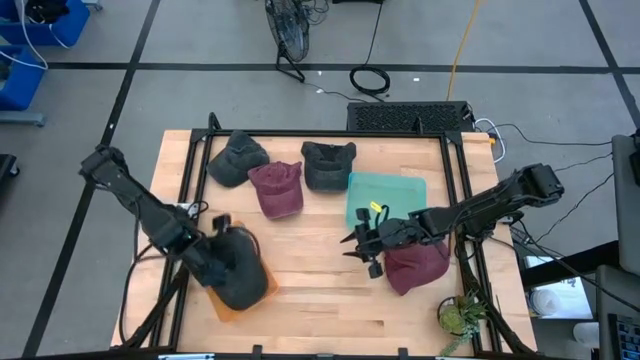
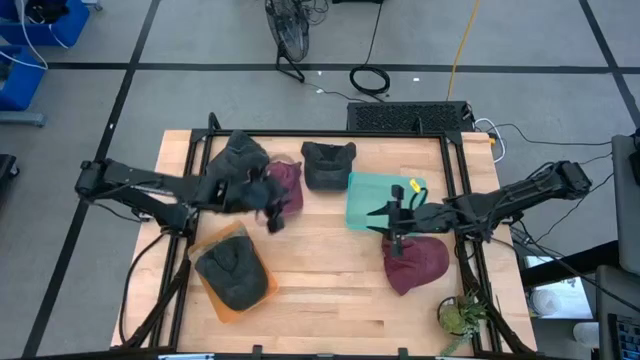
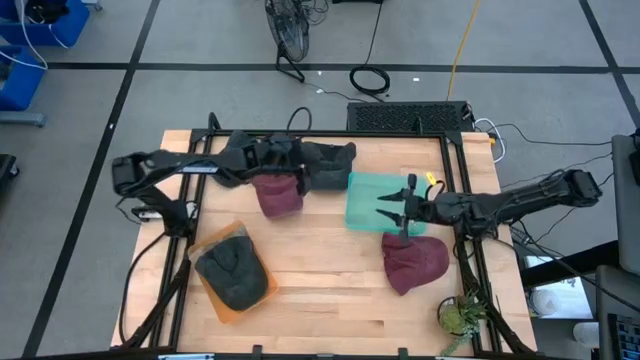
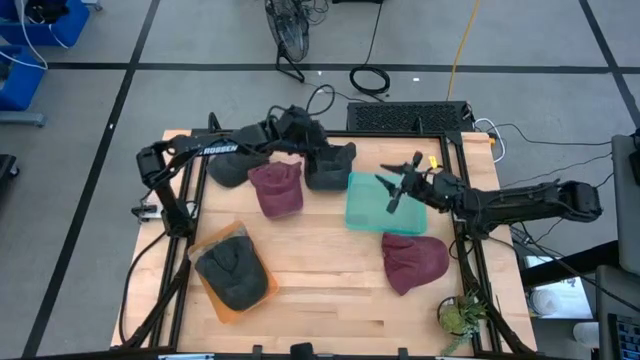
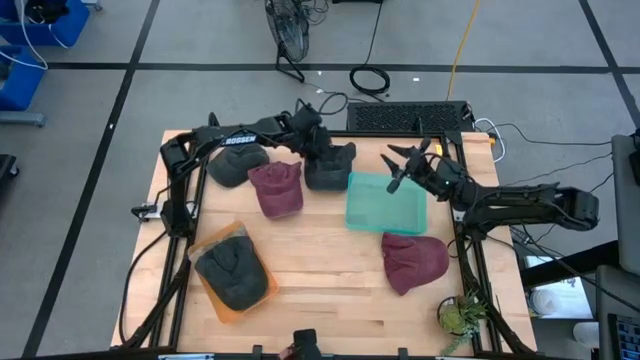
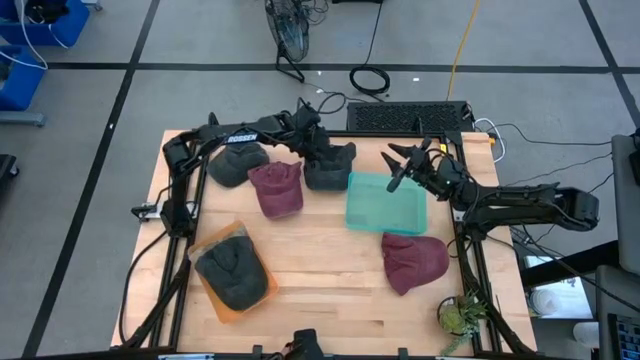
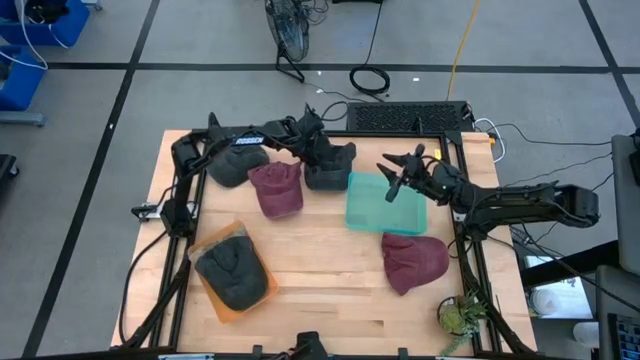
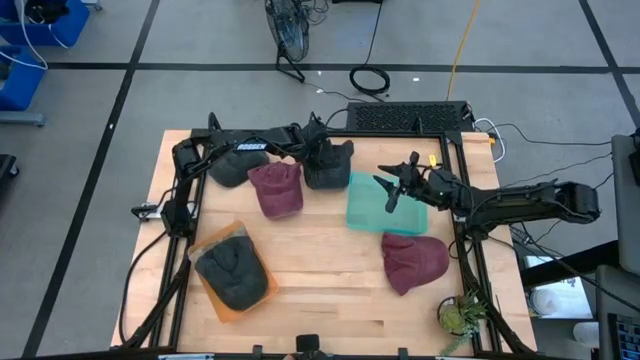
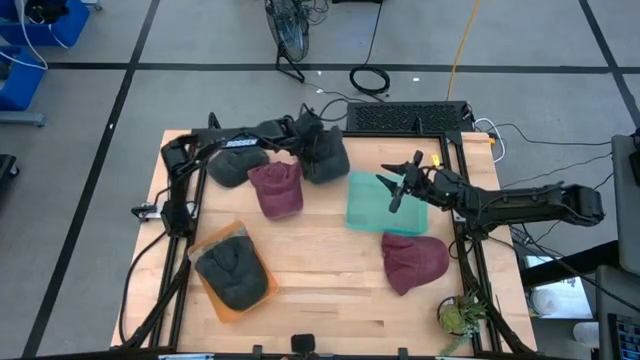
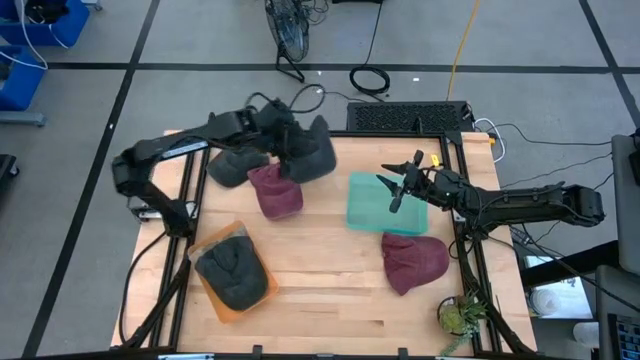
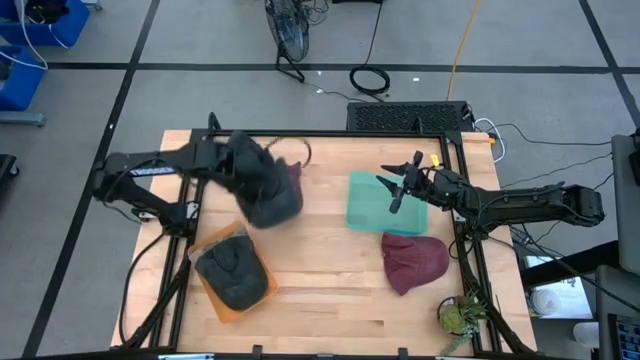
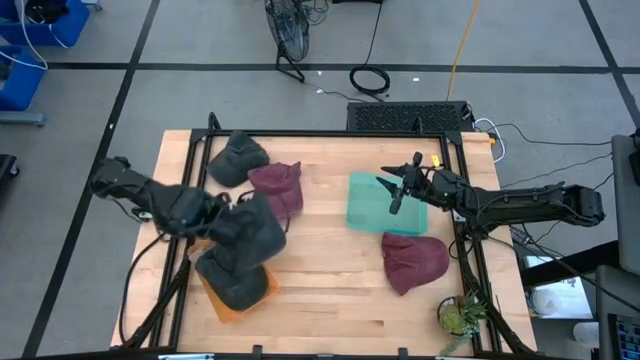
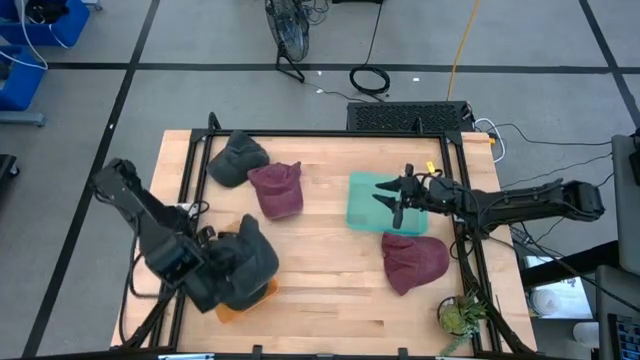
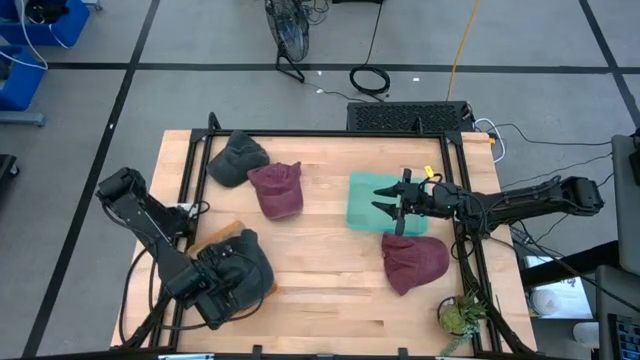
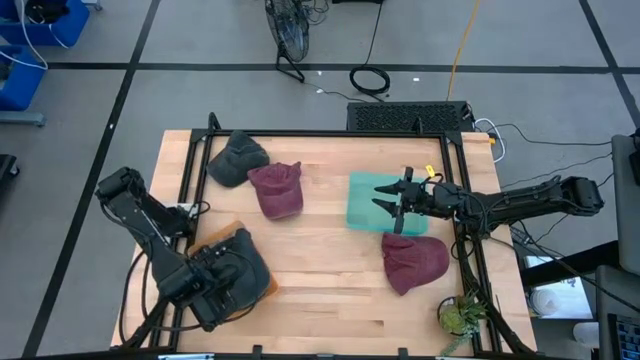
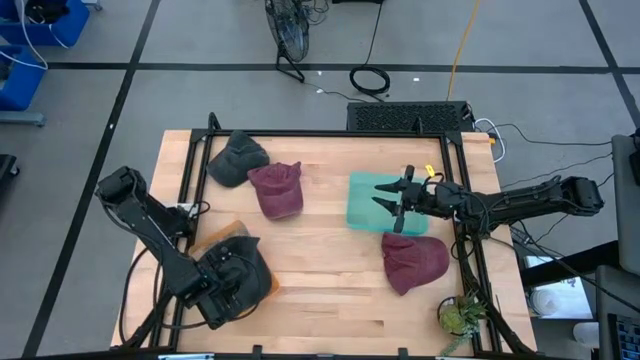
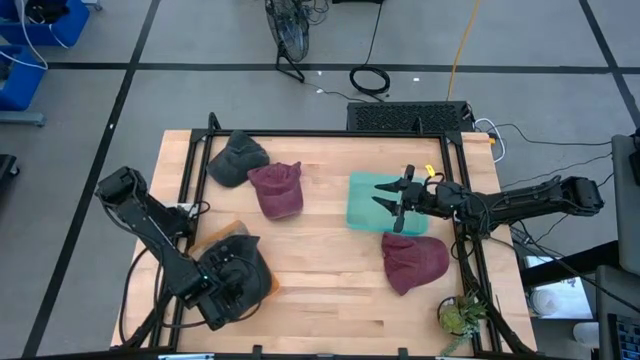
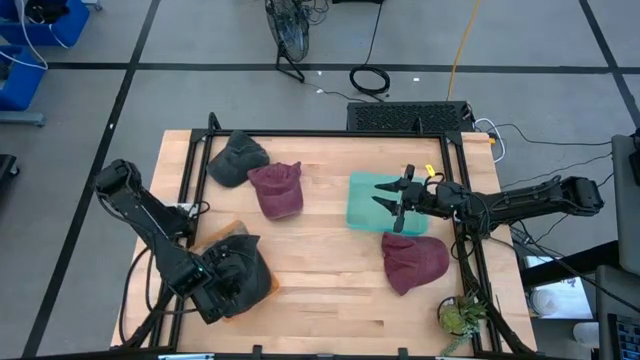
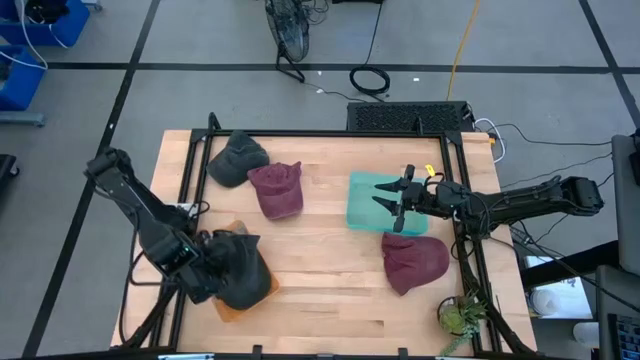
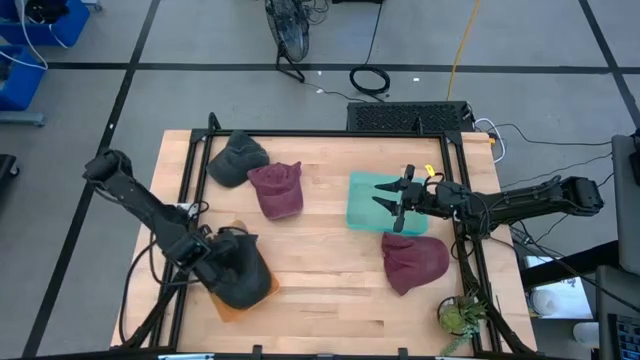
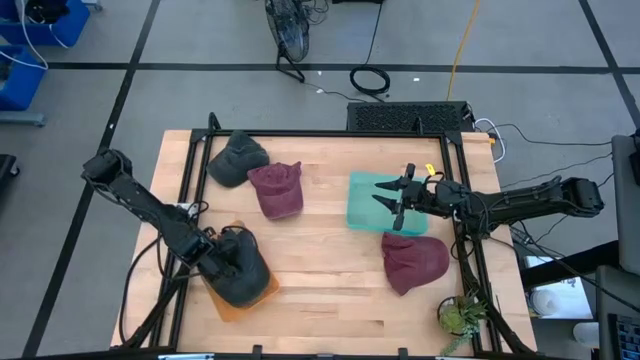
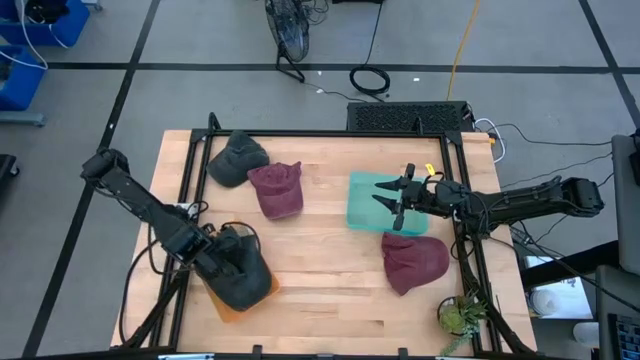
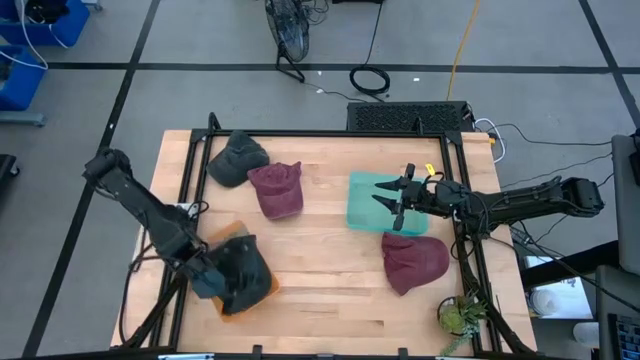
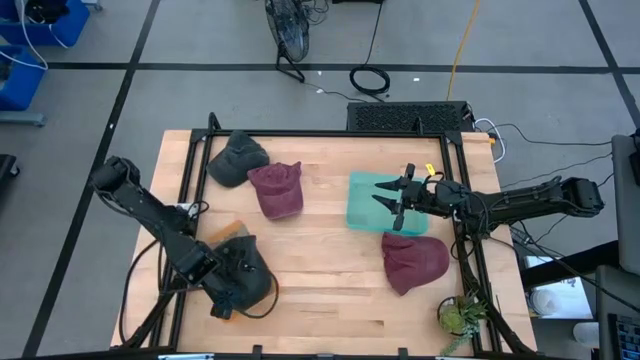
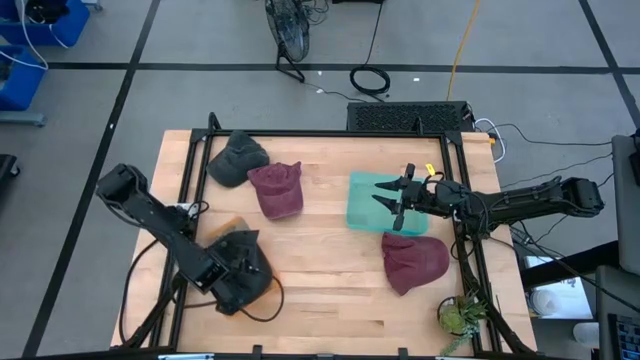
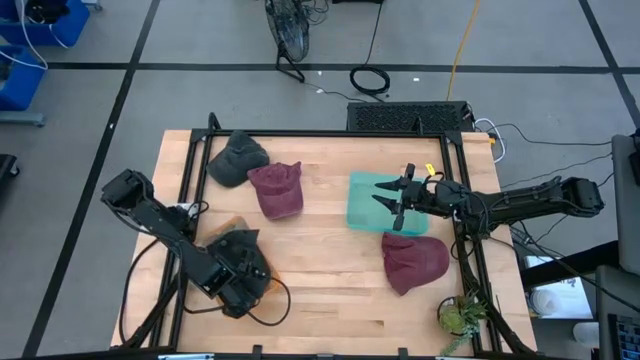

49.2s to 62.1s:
Task: Pick & Place hat
Put the right black cap into the orange bin

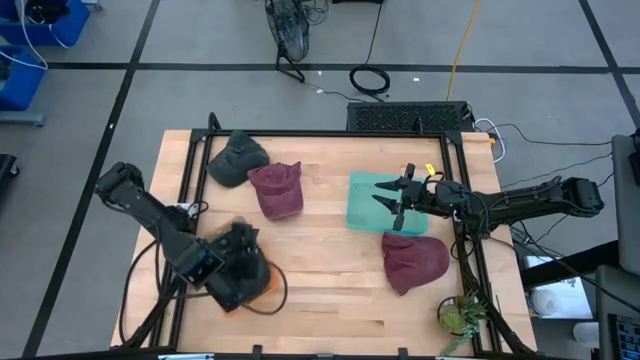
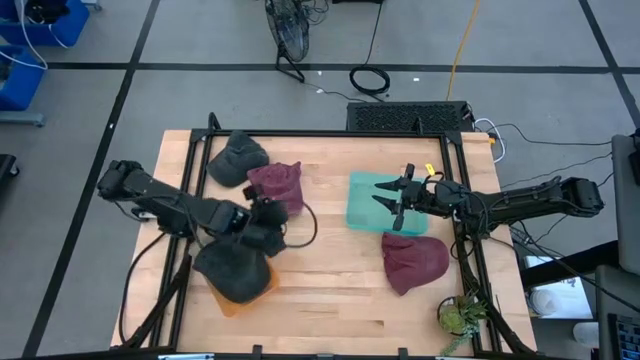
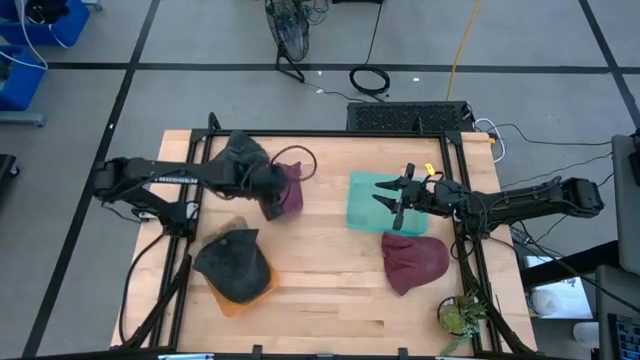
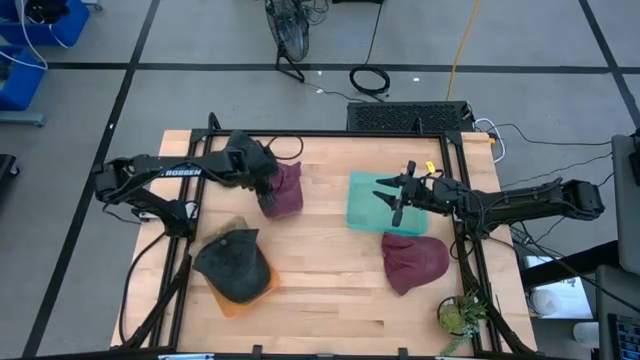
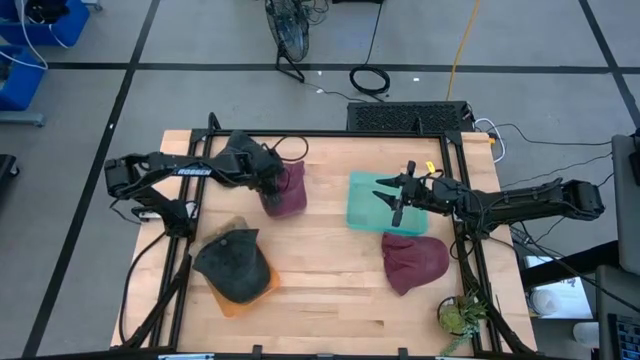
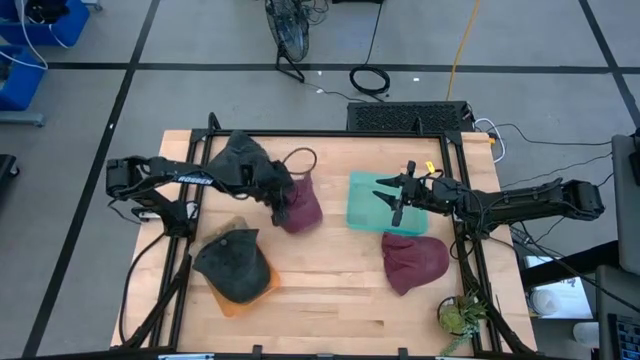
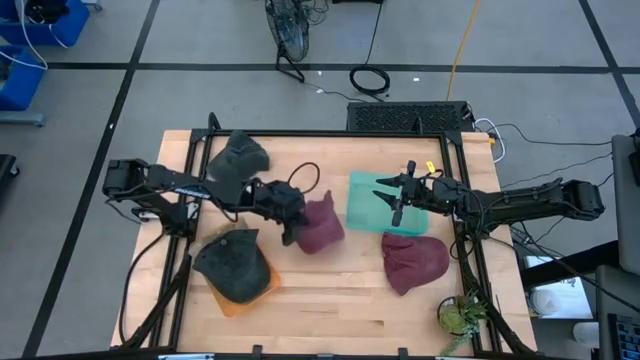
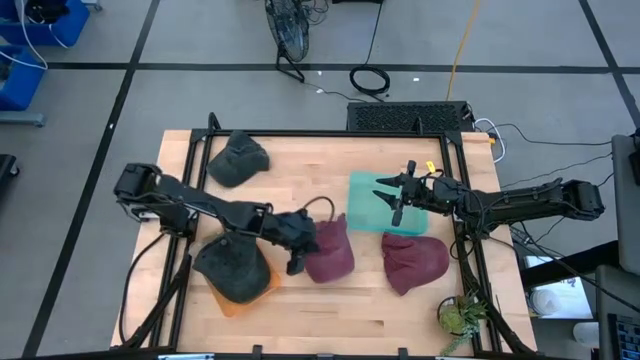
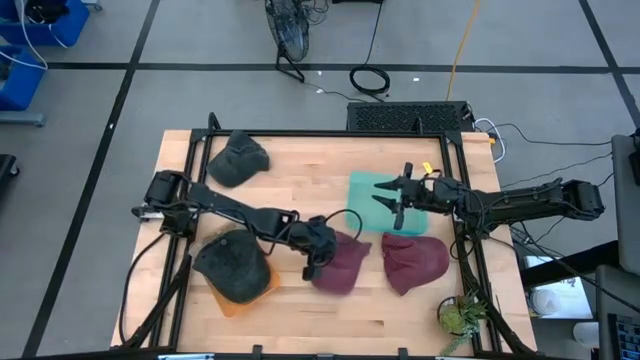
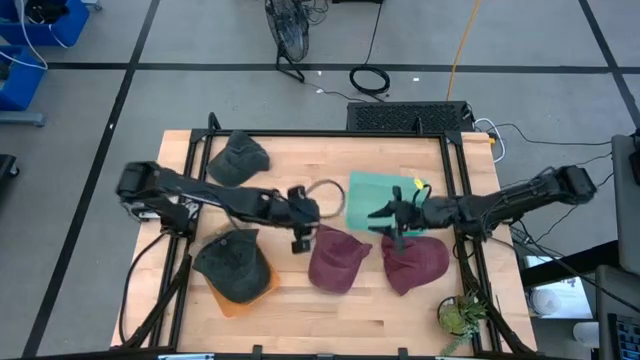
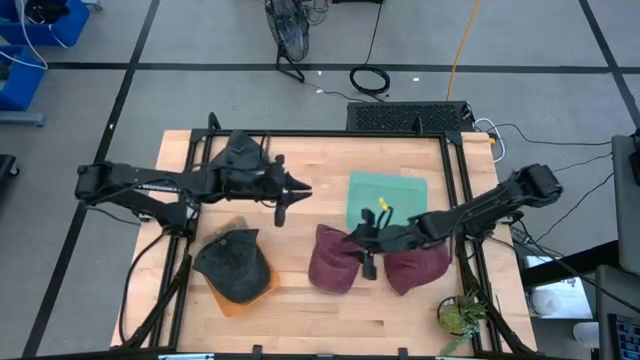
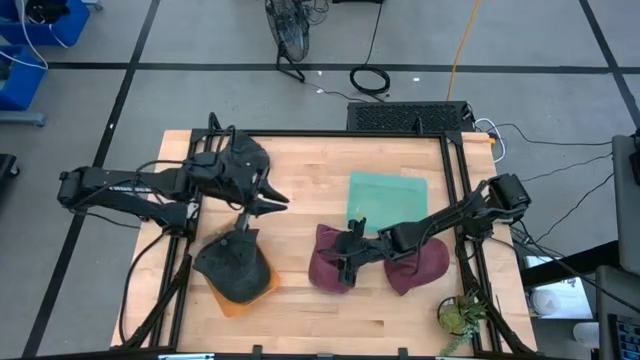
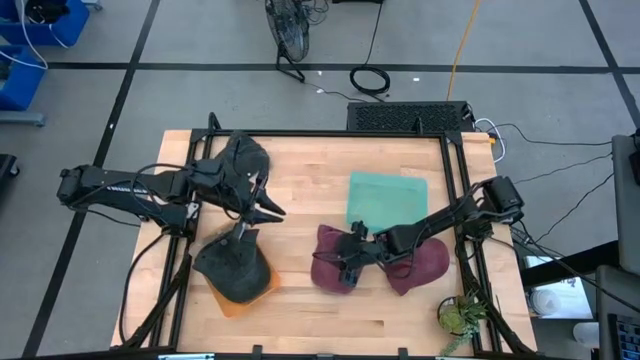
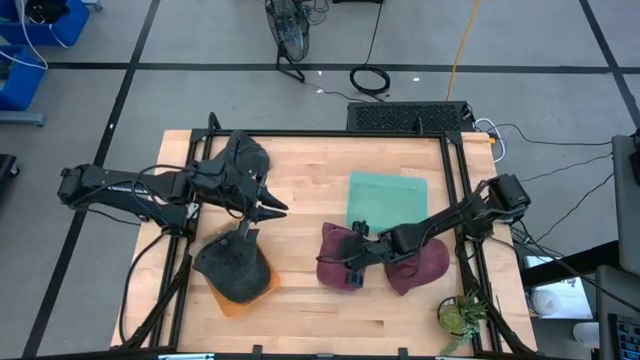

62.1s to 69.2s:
Put the left red cap into the blue bin

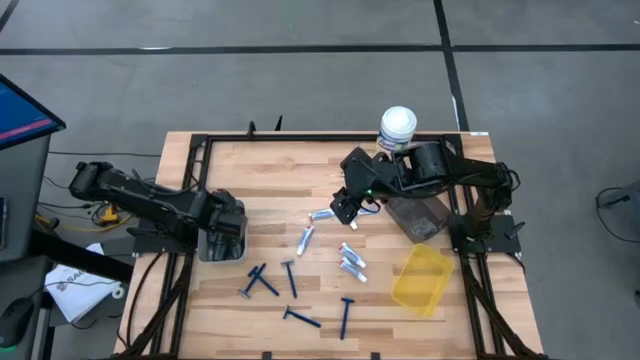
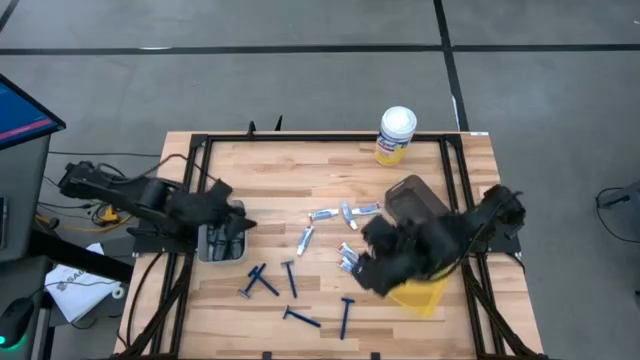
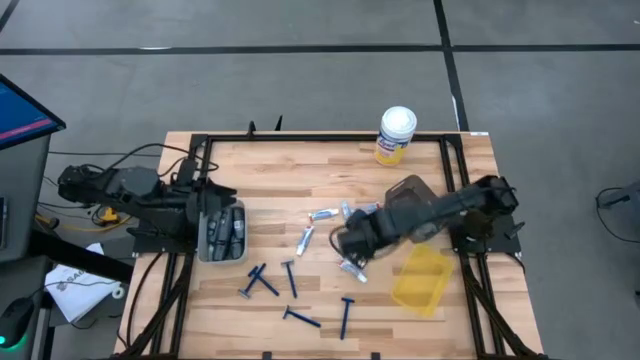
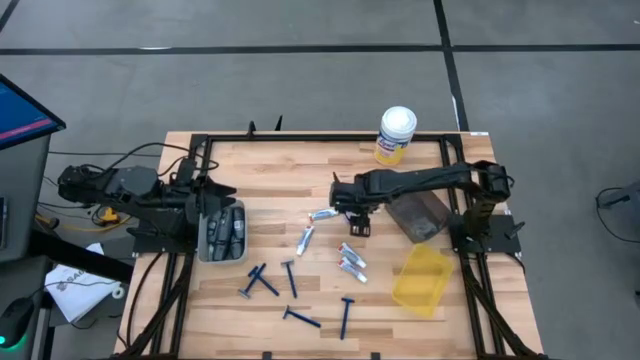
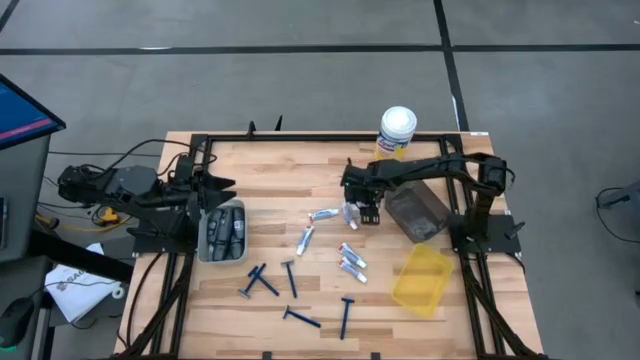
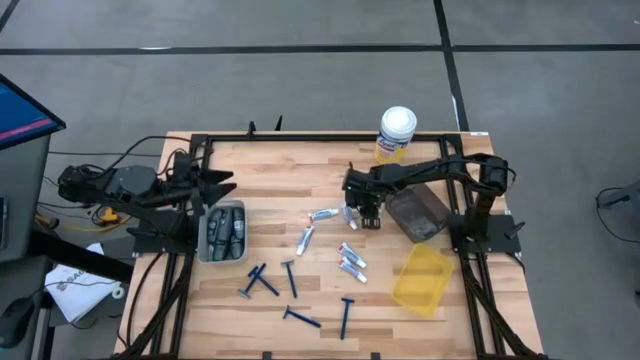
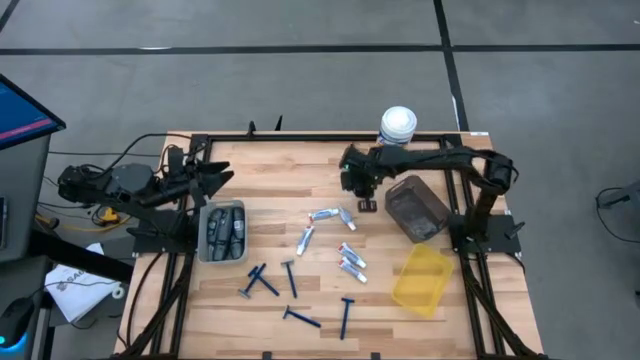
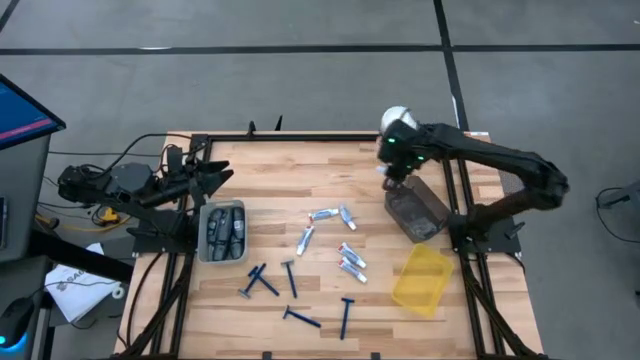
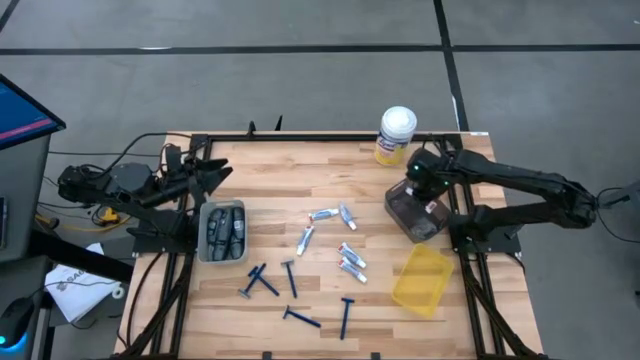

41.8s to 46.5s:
Task: Pick & Place Travel size toiletries
Put the white toothpaste into the black bin
